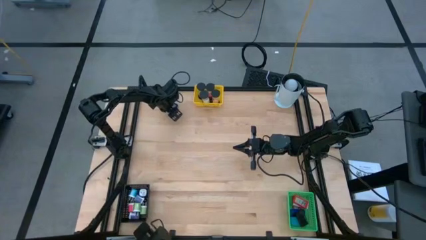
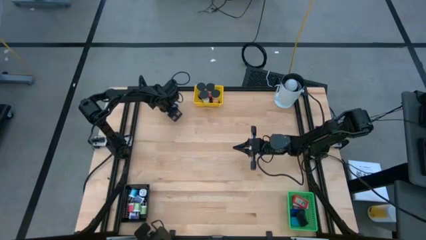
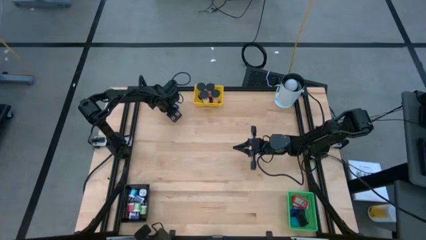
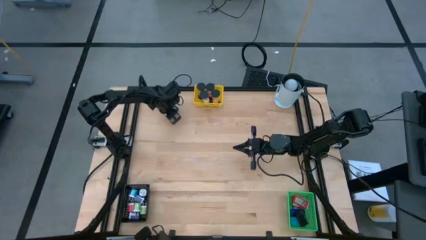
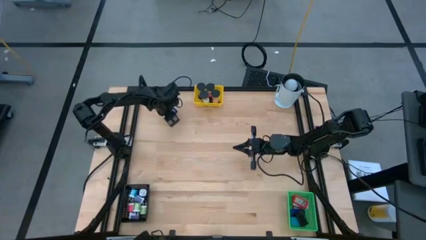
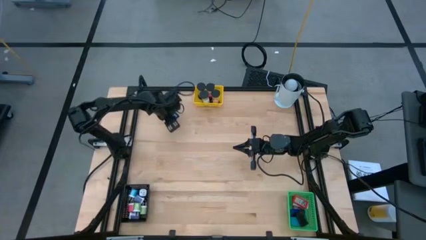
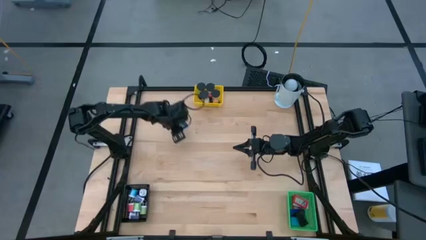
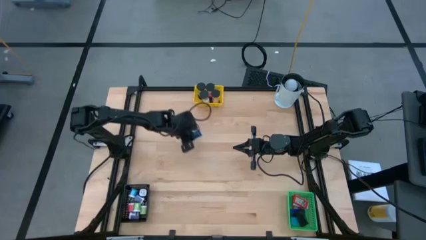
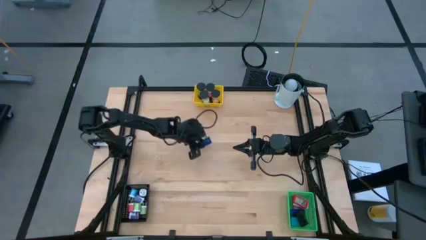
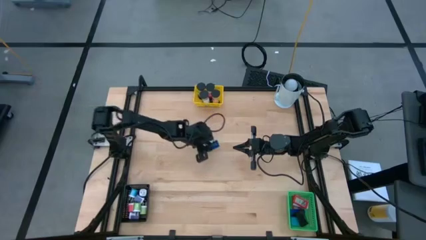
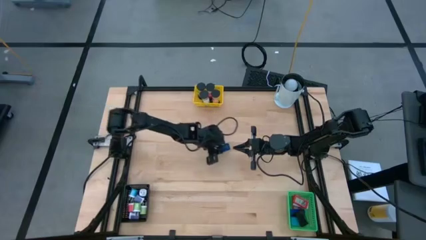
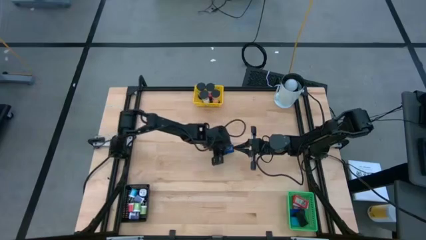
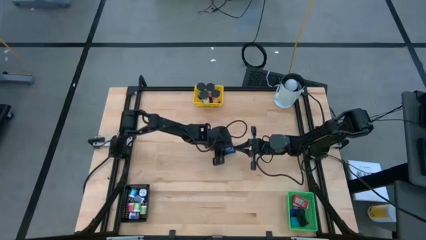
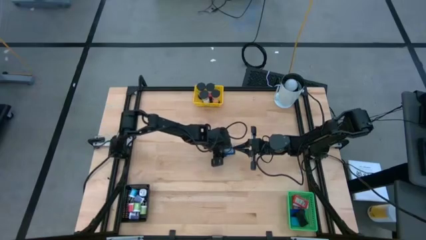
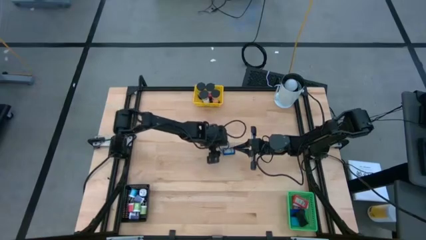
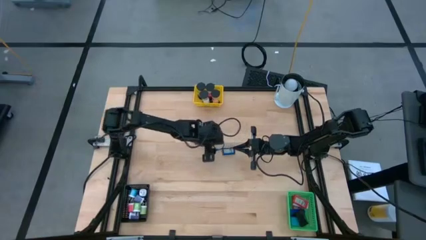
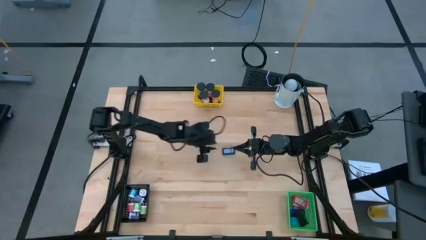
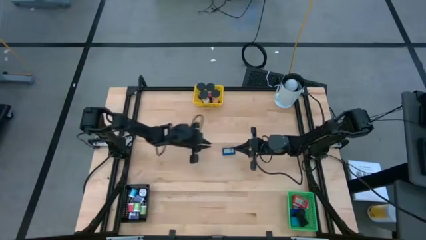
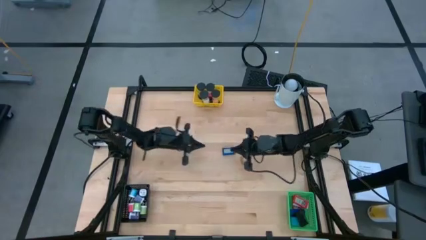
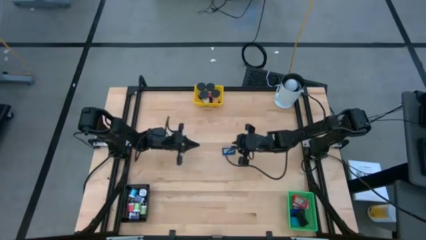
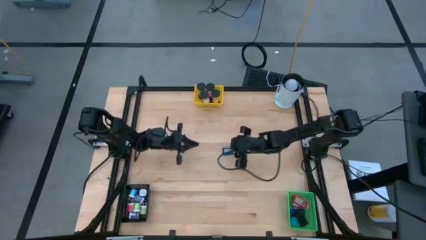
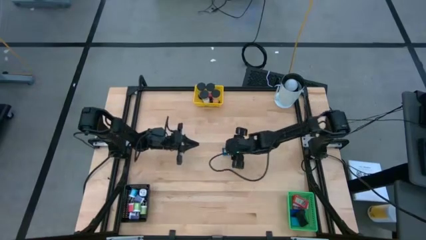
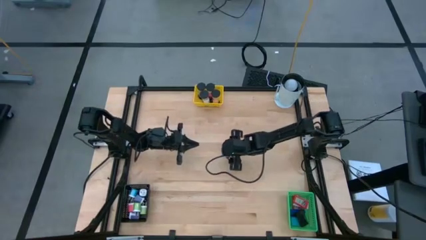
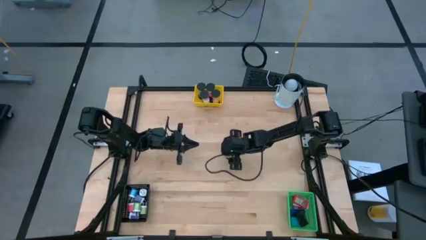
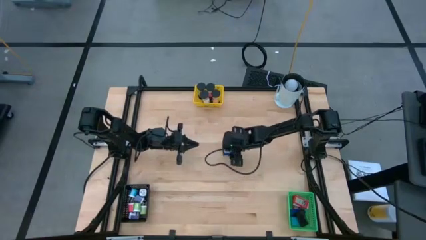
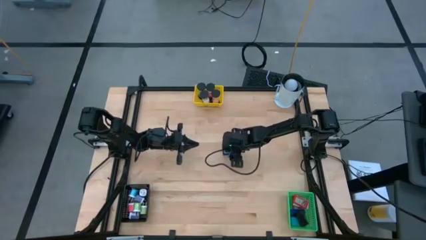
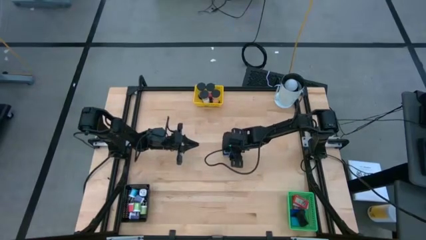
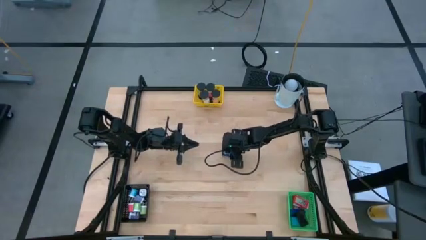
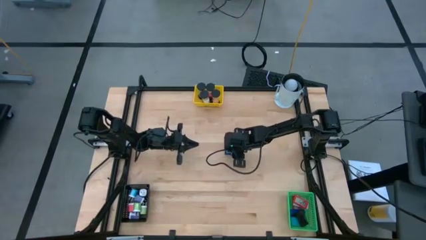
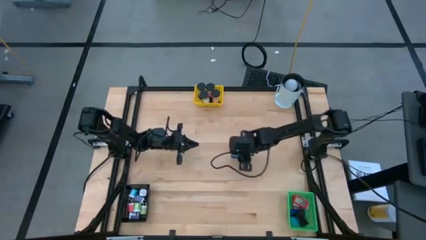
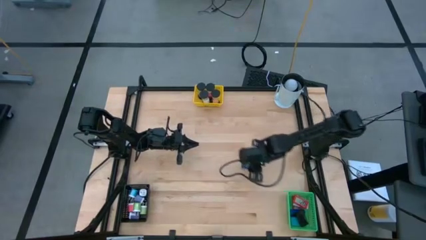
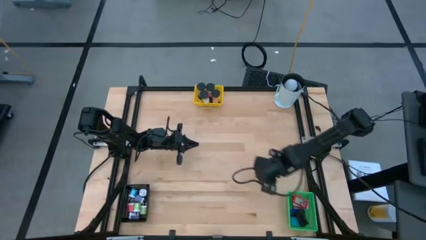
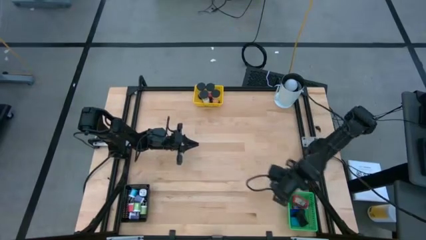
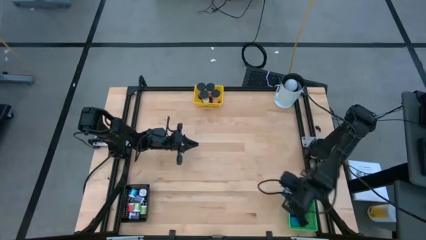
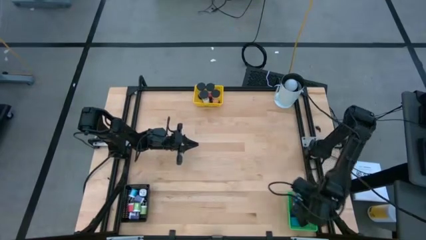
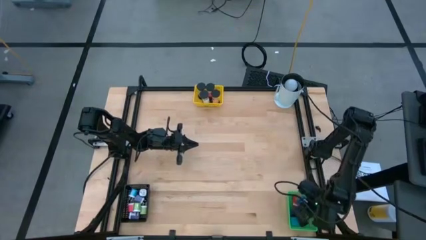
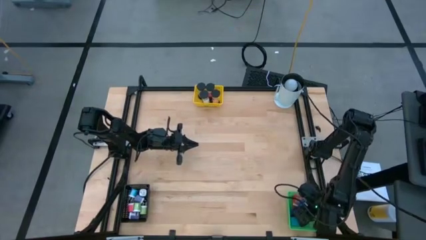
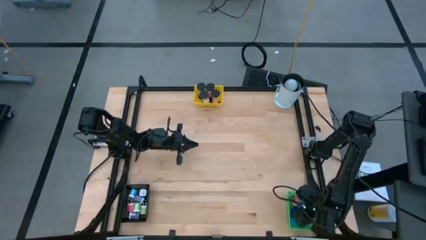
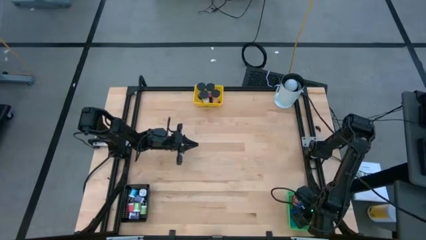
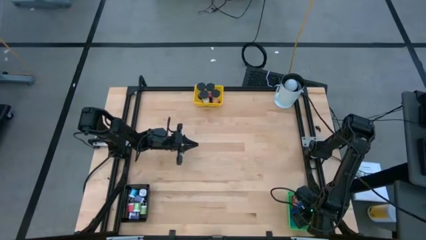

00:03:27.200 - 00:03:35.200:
Task: Pick & Place Office items
Put the dark blue digital timer into the green bin

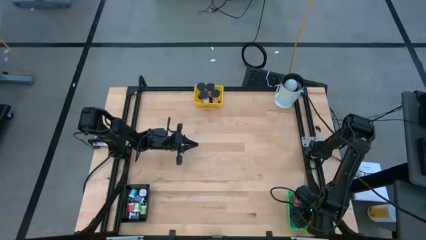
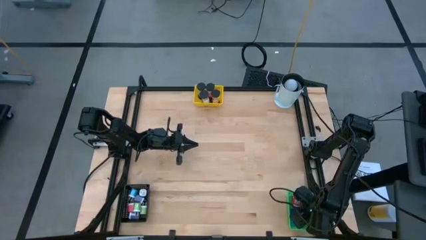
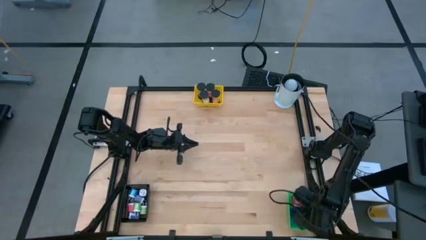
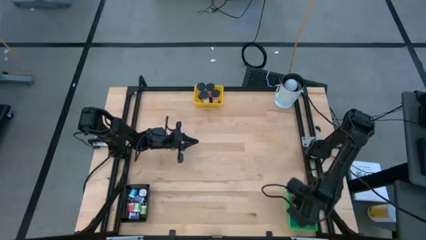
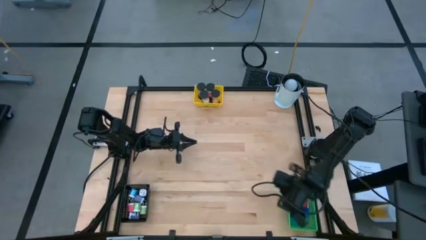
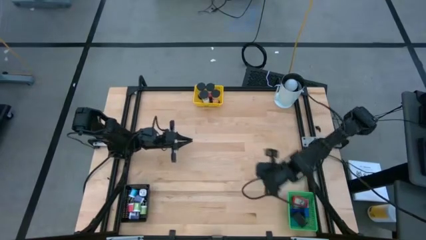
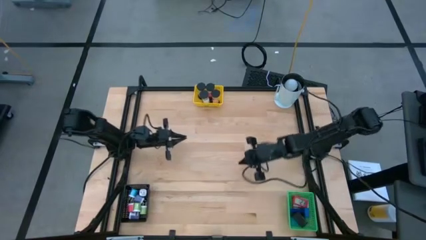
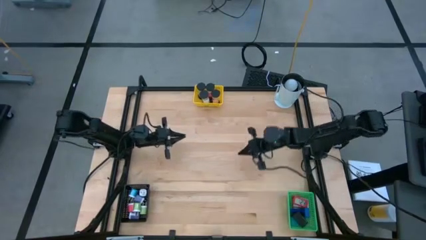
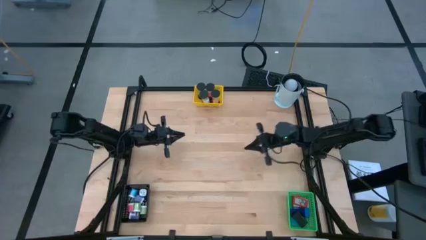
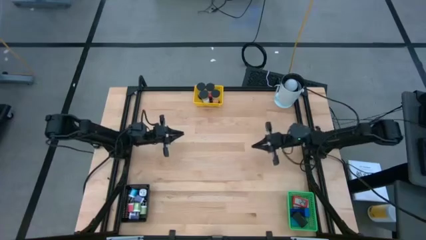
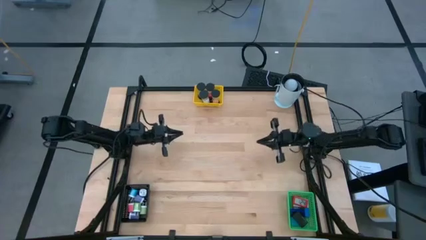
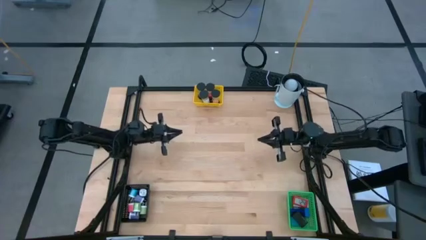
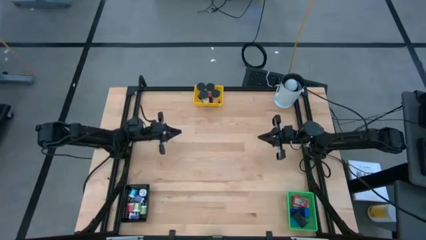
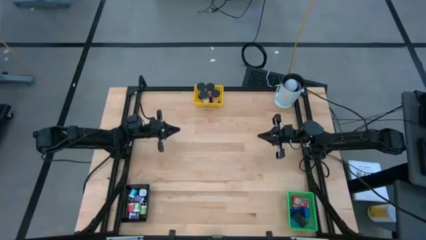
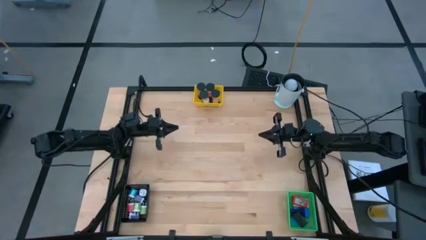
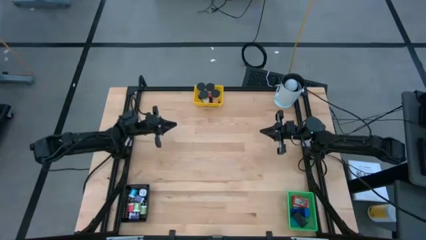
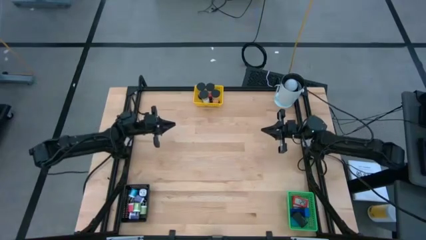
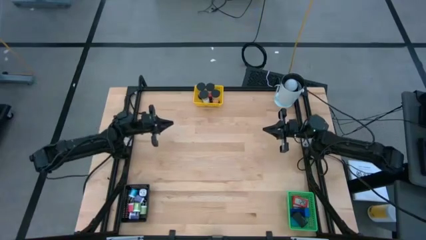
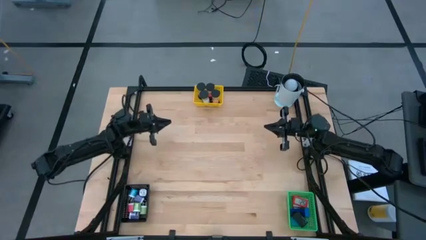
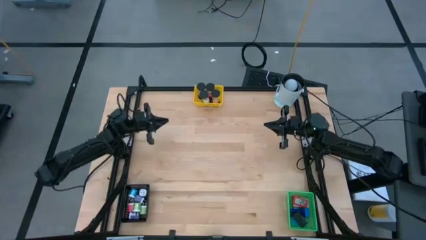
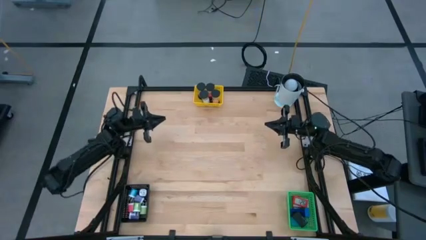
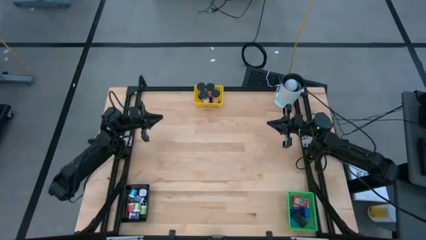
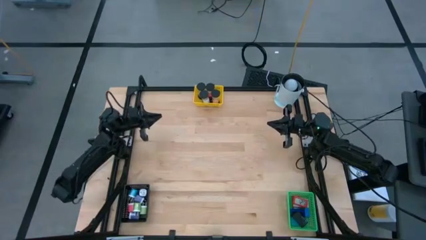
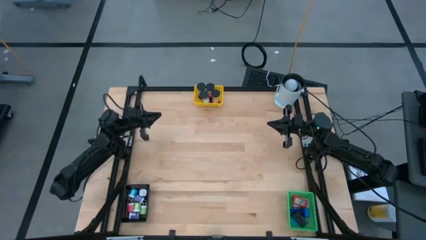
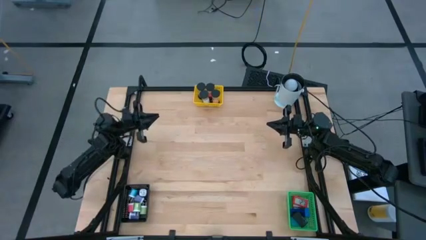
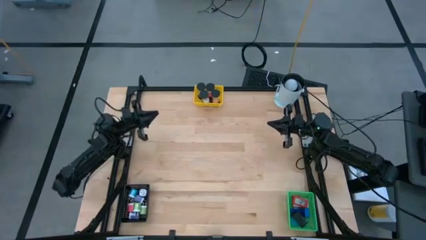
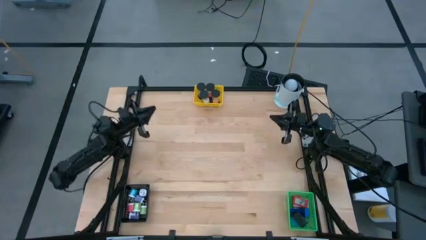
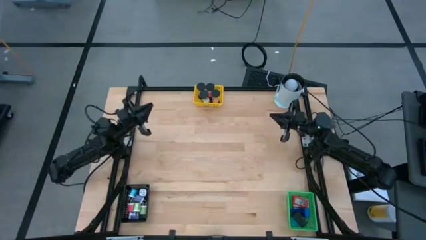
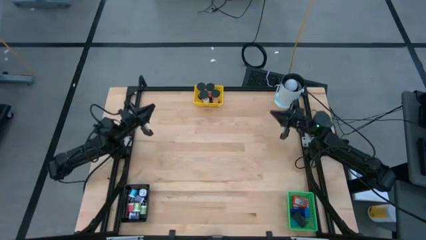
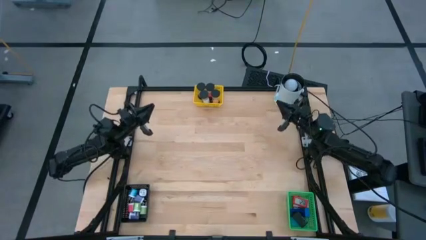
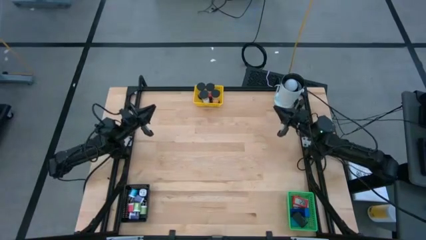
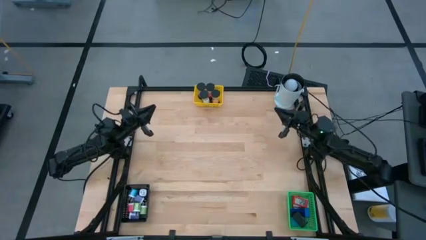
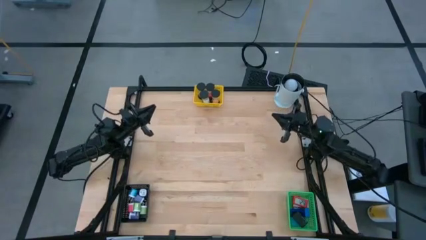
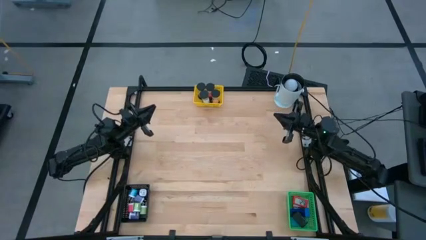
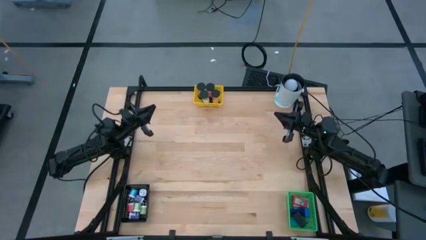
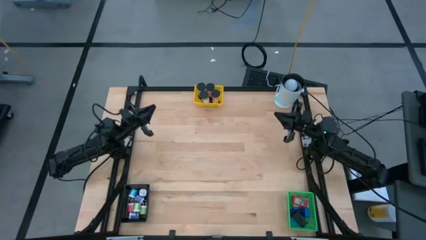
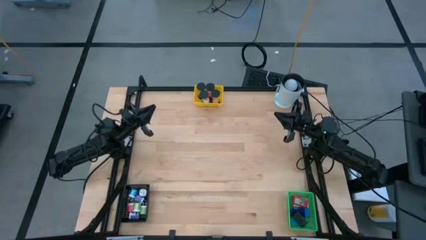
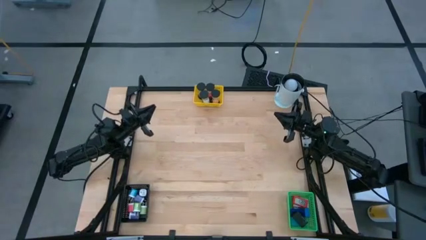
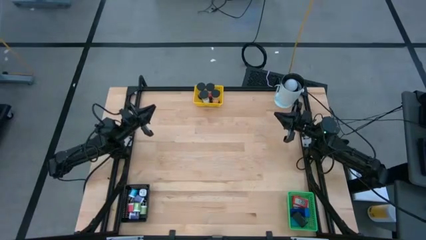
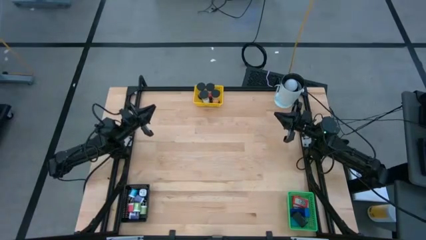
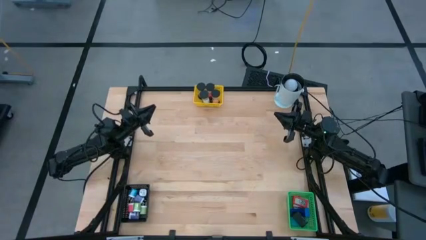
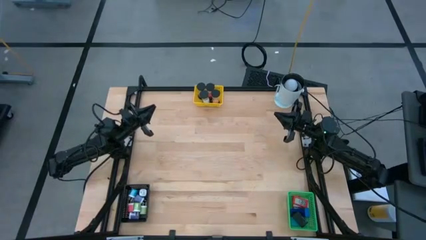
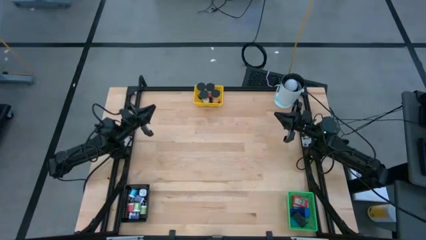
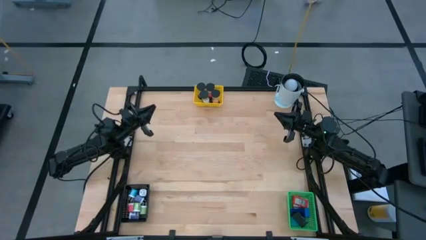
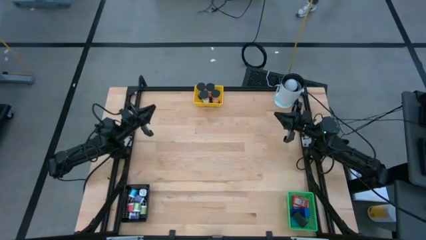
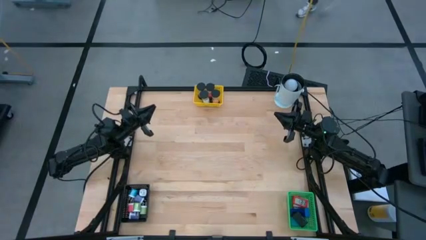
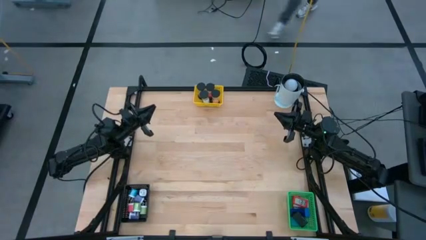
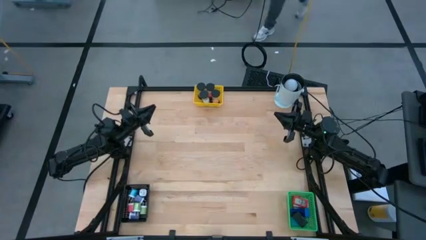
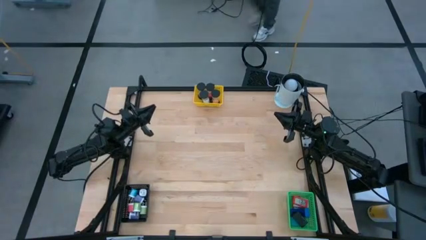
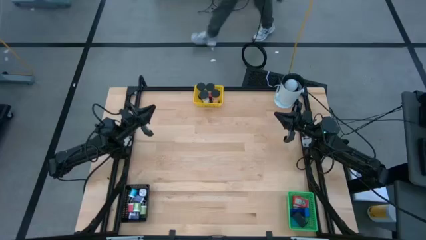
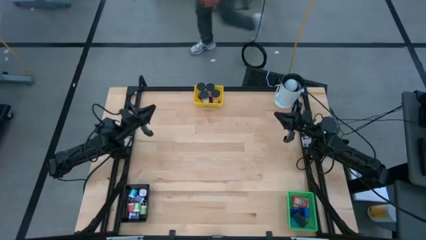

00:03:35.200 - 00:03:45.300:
Return to Home Position
